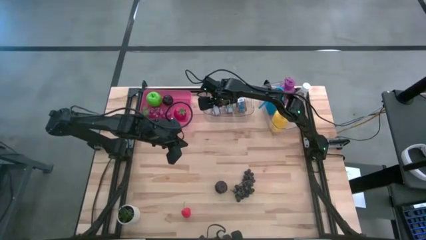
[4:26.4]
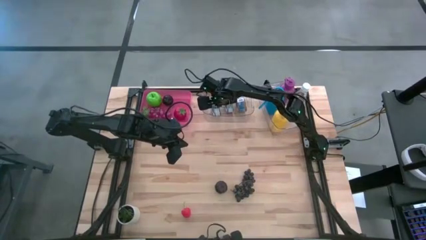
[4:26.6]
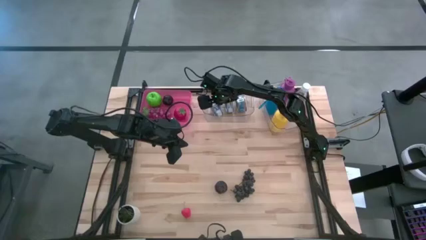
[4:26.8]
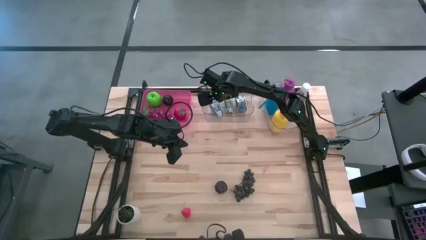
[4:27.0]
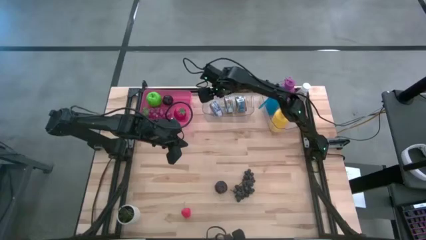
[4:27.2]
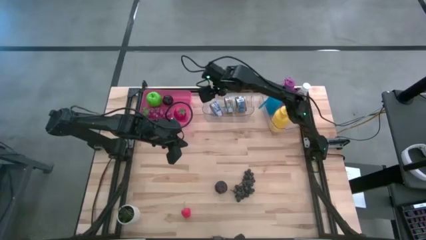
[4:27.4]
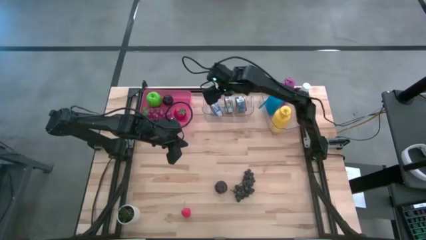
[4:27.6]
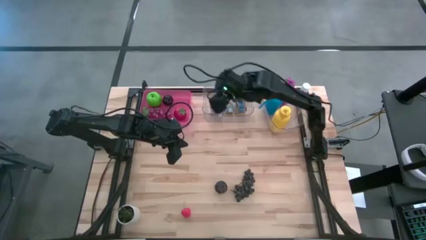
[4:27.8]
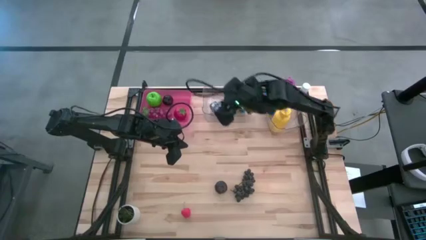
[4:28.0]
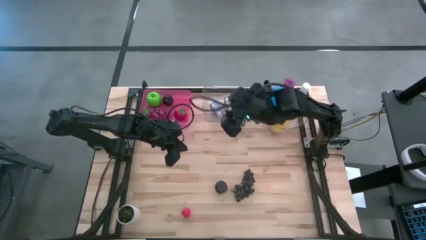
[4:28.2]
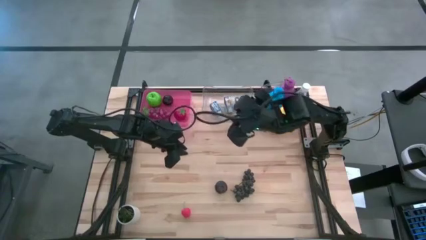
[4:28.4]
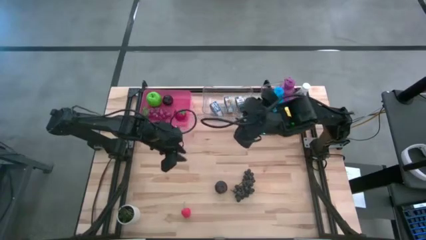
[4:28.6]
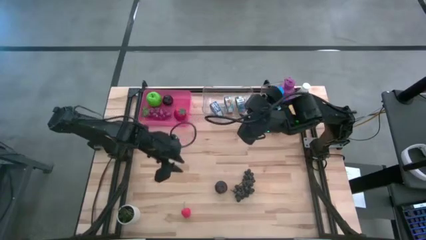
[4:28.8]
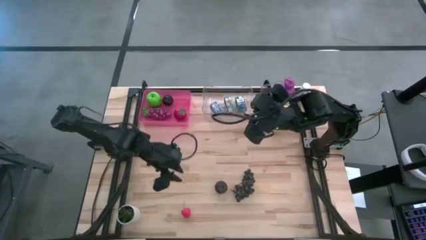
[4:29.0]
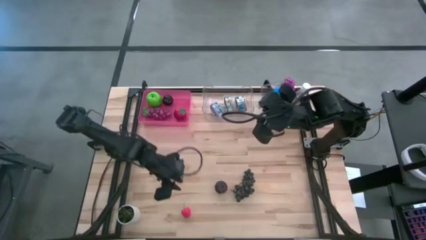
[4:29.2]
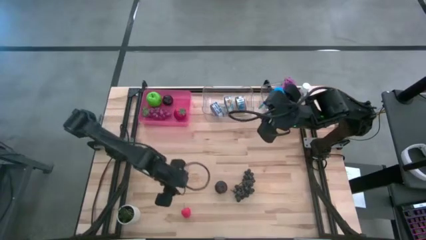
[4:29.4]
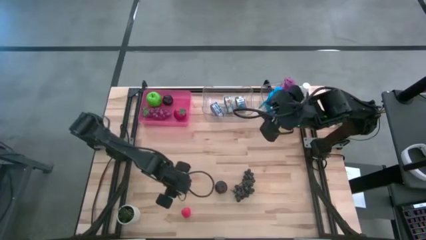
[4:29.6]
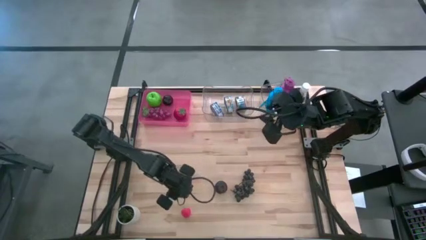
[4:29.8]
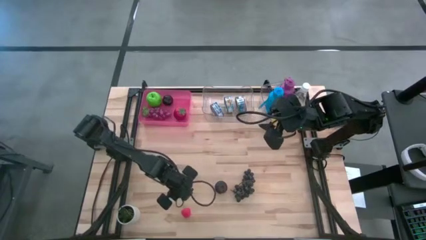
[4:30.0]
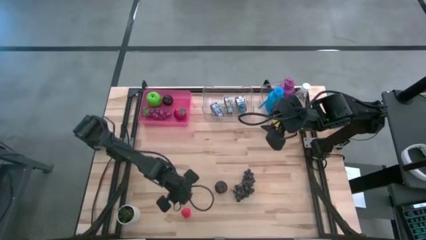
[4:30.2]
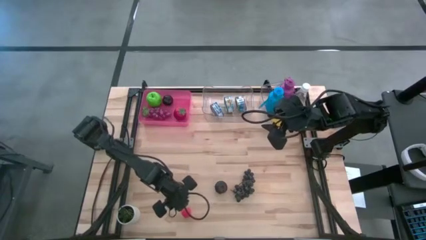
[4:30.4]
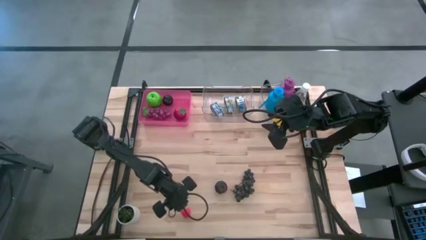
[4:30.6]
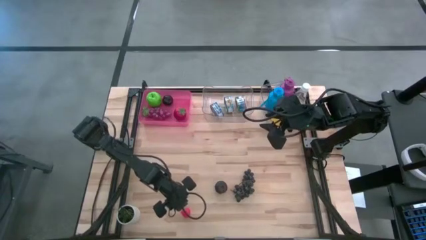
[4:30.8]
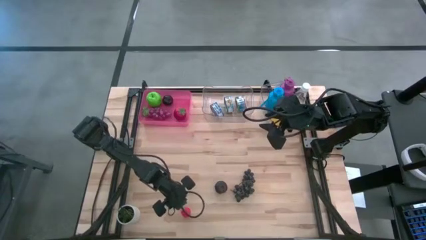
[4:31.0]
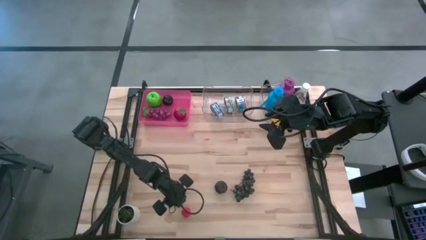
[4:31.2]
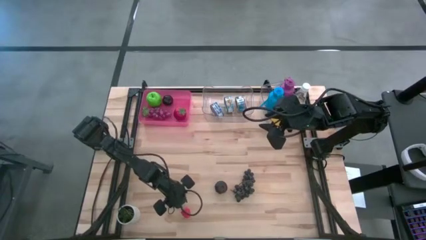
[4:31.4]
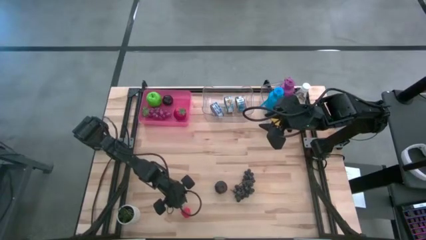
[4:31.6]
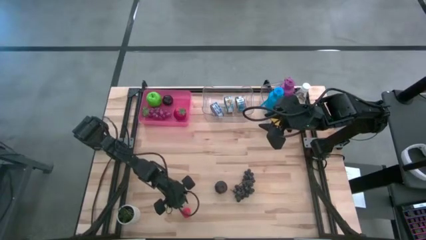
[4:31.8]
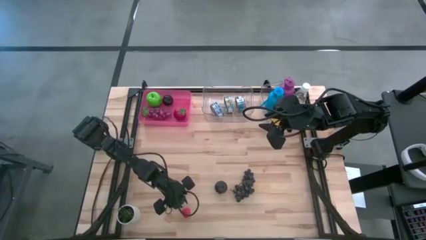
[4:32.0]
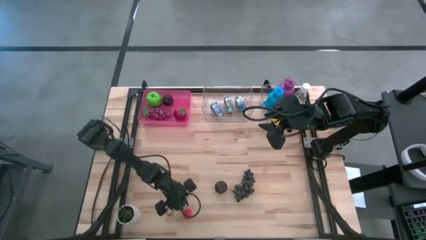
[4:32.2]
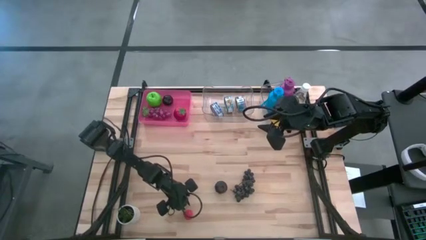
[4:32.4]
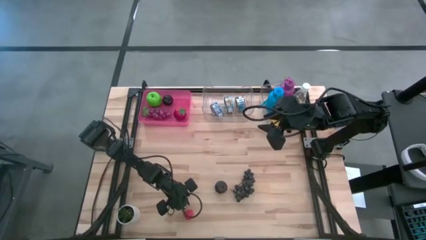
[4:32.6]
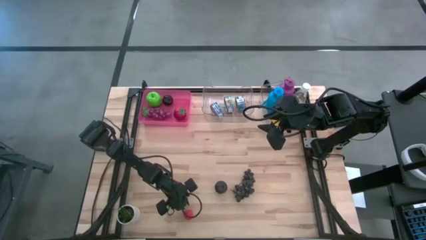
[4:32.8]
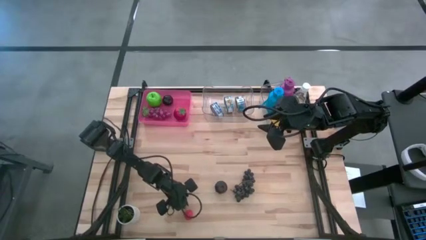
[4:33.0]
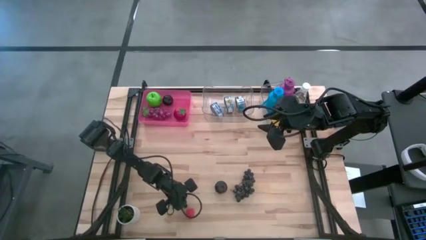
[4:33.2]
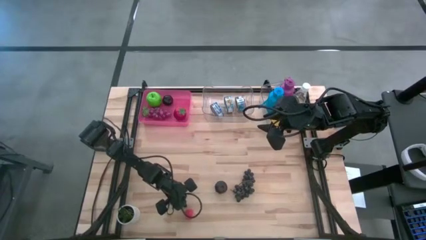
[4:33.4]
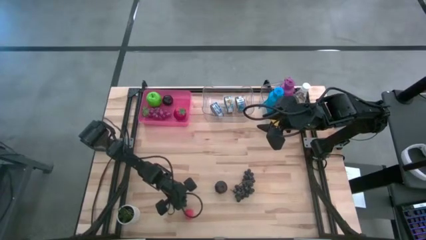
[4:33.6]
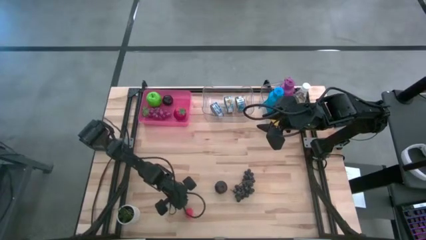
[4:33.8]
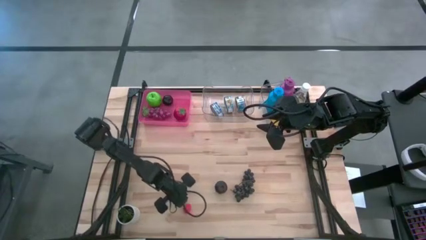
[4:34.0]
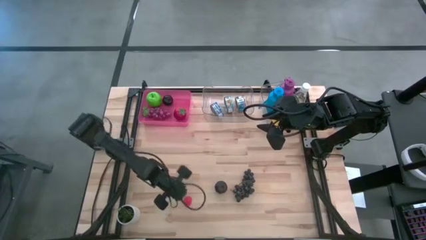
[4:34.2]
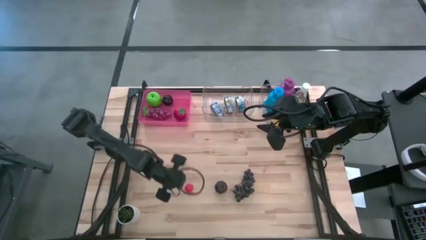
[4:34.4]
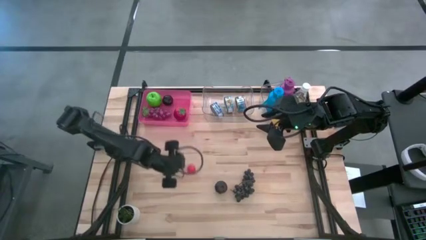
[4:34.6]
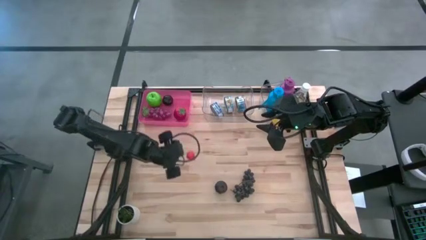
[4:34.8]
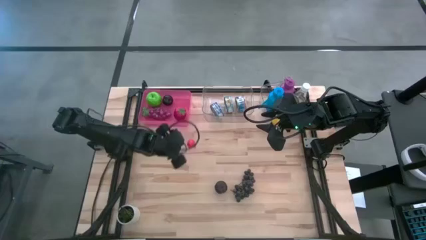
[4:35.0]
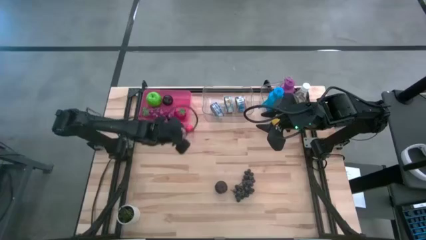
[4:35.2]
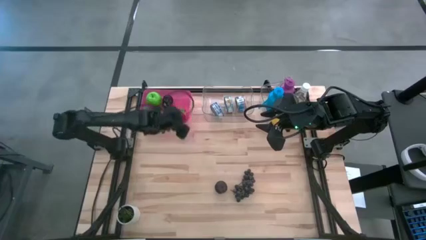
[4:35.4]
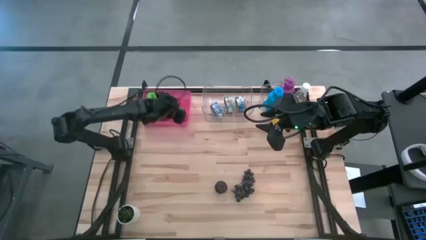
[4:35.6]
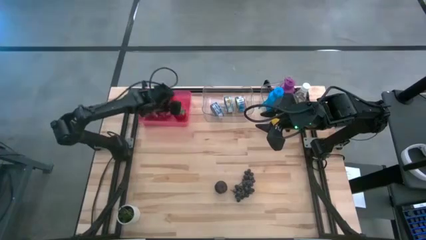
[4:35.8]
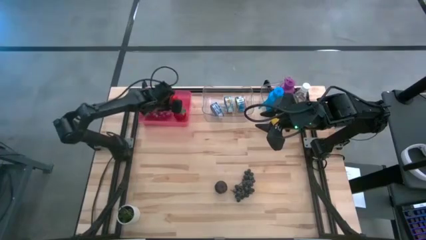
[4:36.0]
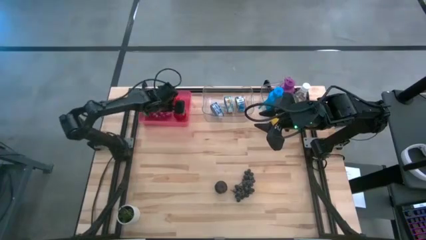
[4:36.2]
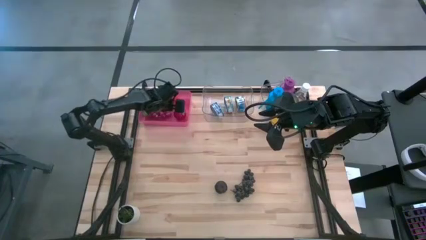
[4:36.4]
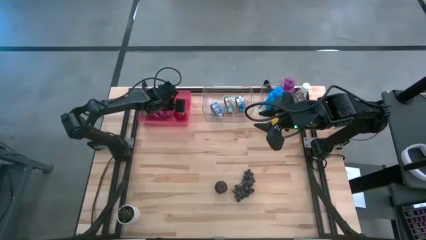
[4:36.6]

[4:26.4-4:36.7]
Task: Pick & Place Food Item
Put the red strawberry into the red transparent bin

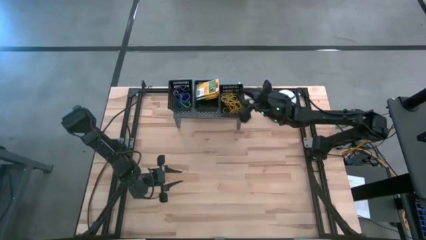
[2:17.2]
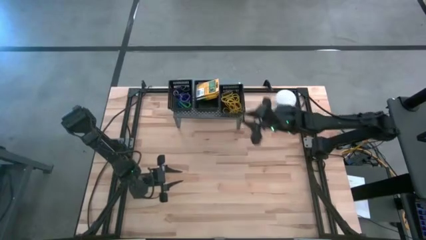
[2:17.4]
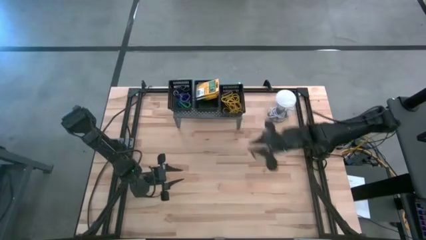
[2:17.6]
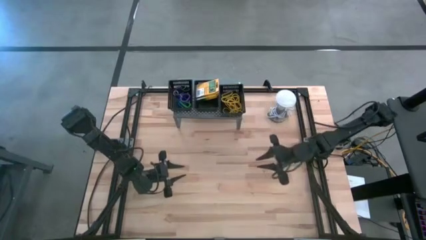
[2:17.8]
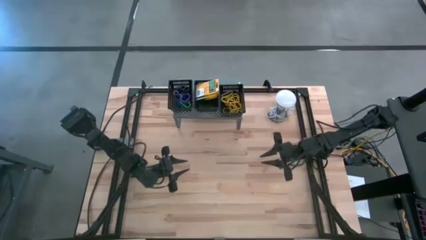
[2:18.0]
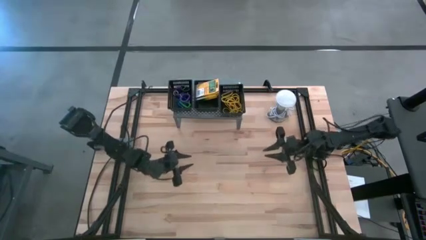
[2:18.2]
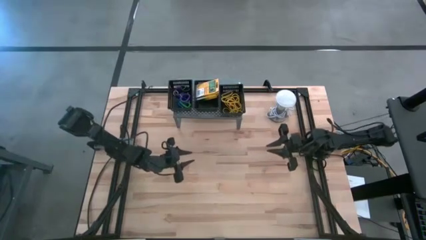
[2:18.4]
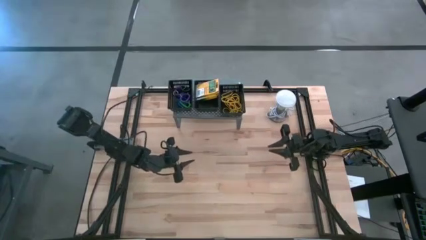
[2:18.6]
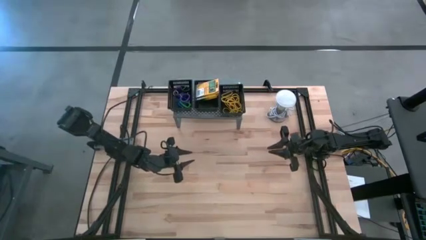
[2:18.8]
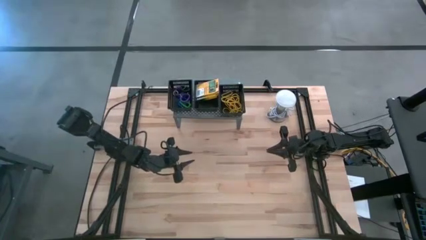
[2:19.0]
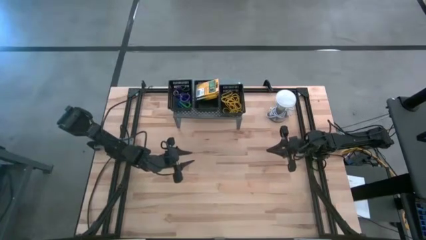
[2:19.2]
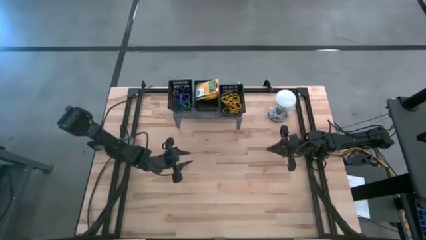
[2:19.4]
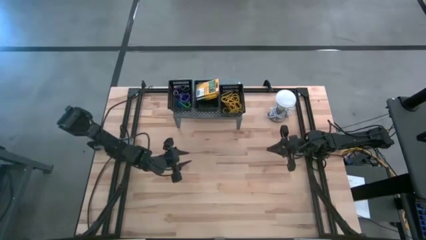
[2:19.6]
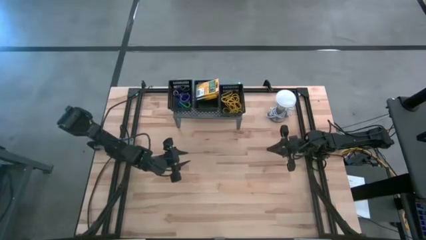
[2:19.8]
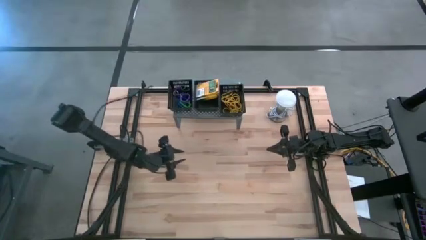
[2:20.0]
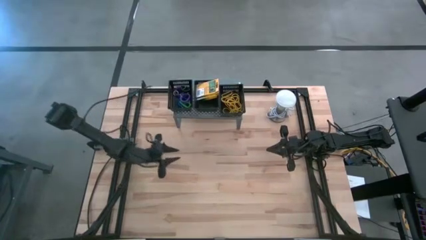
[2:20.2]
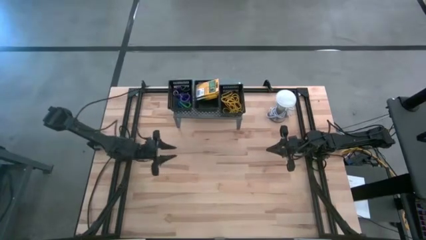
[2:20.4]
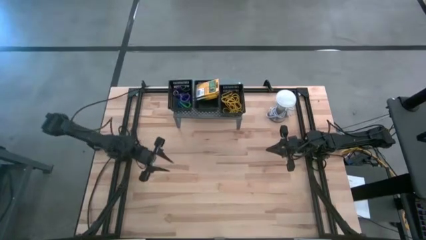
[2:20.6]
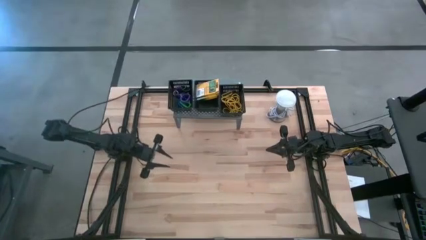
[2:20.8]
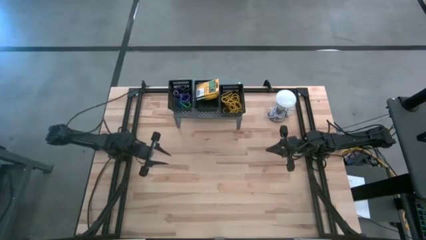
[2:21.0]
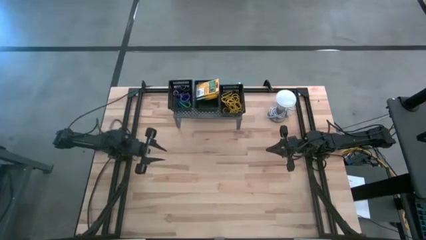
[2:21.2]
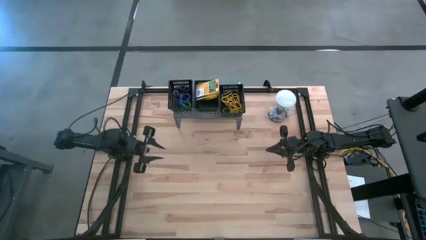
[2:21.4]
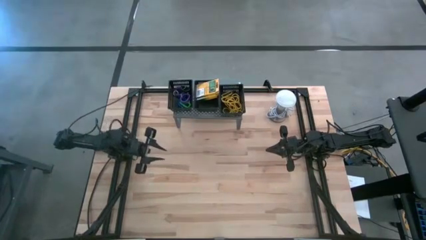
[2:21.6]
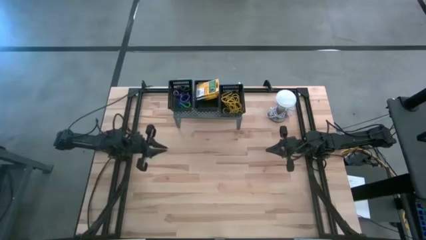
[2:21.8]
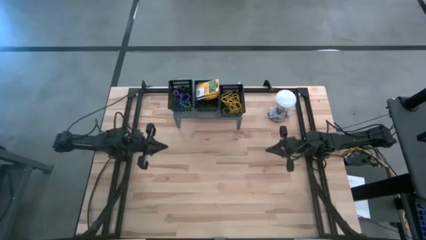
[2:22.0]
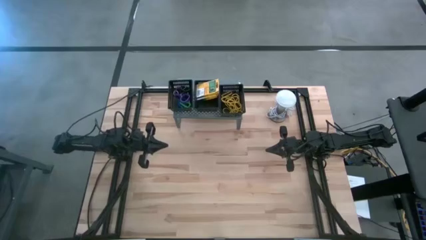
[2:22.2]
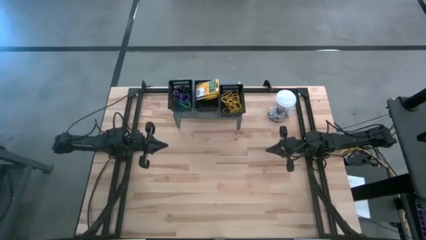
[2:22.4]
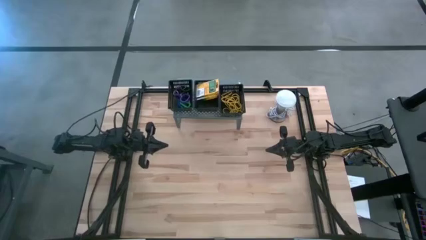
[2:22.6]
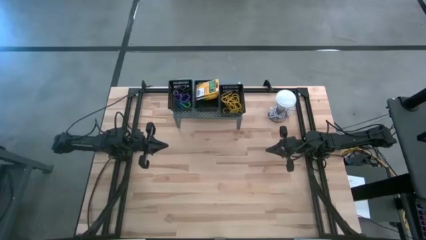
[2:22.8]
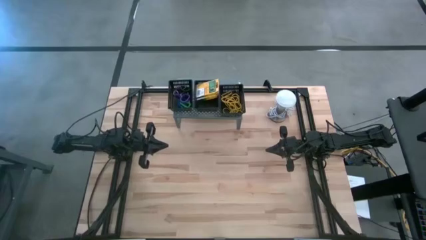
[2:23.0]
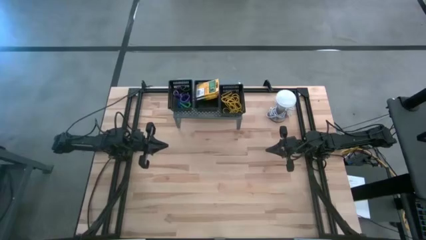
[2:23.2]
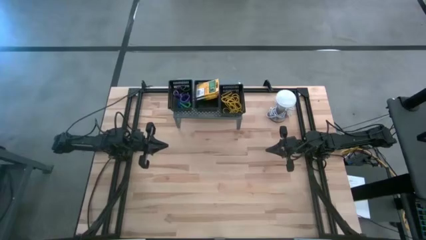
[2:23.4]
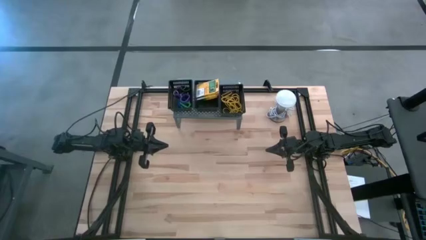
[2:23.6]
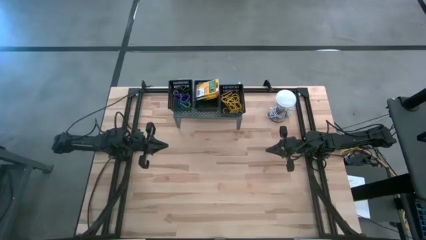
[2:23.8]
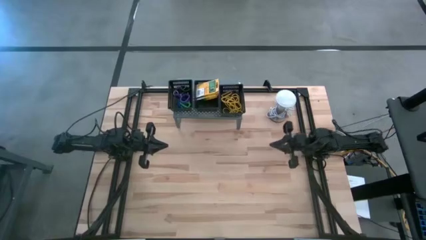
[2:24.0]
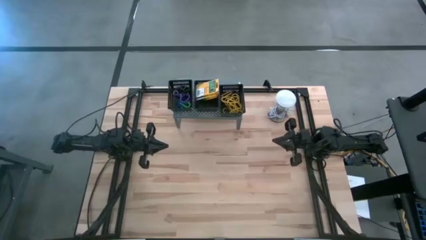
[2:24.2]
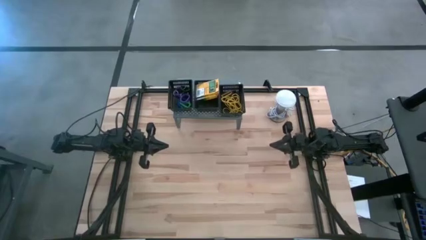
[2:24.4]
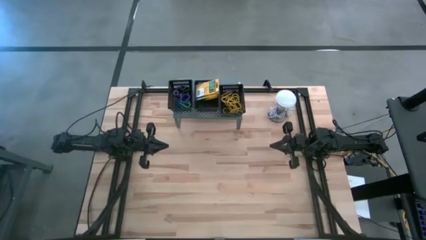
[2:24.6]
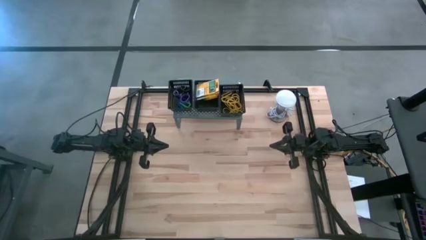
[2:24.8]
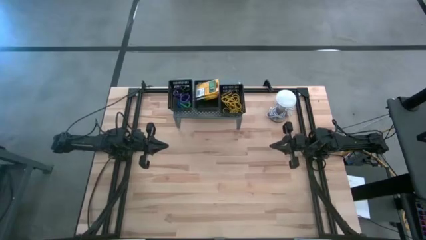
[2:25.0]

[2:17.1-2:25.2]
Task: Pick & Place Office Desk Supplies
Return to Home Position
